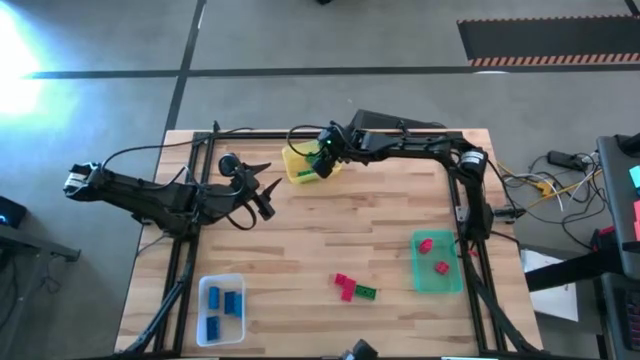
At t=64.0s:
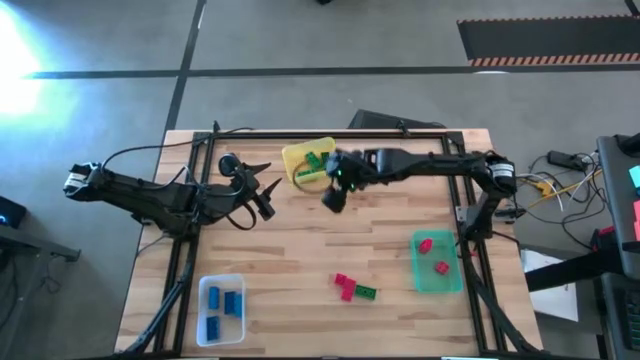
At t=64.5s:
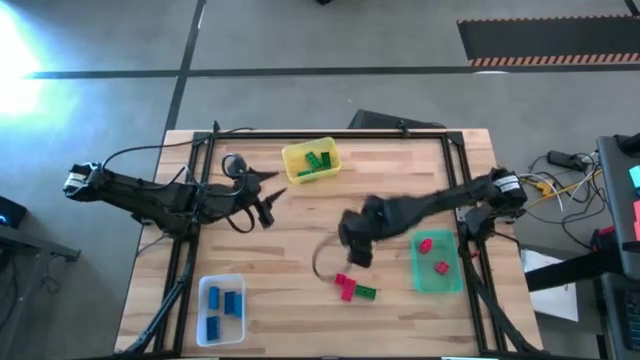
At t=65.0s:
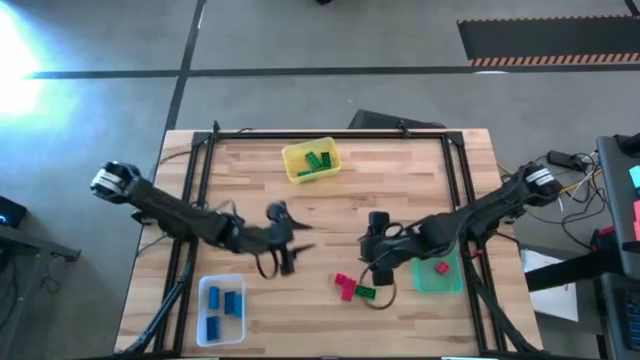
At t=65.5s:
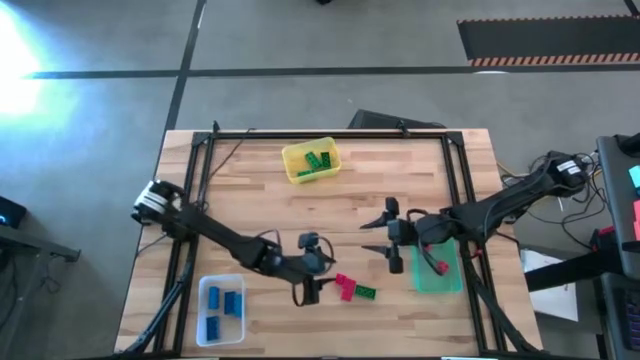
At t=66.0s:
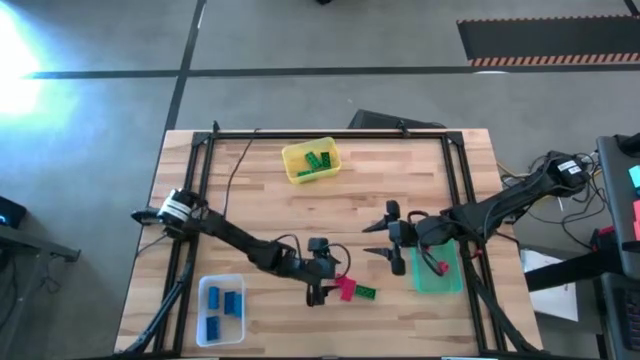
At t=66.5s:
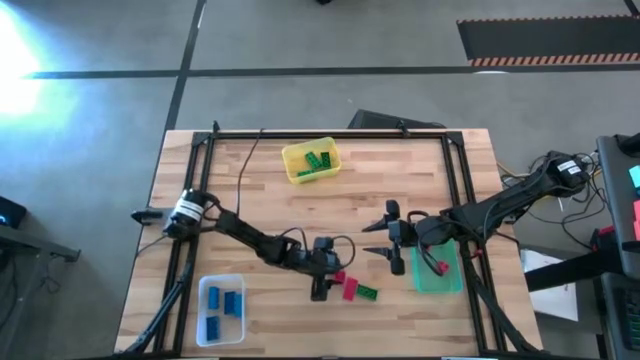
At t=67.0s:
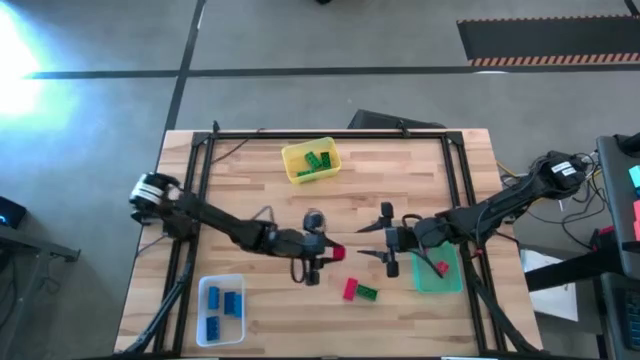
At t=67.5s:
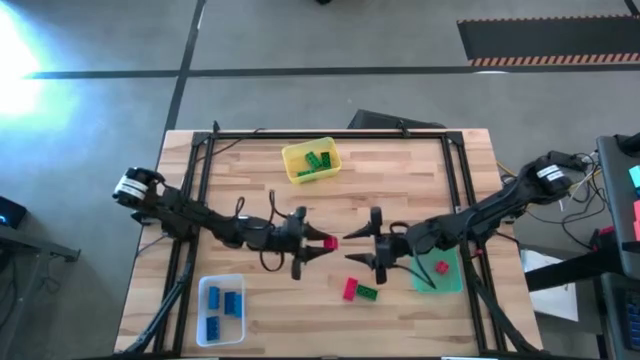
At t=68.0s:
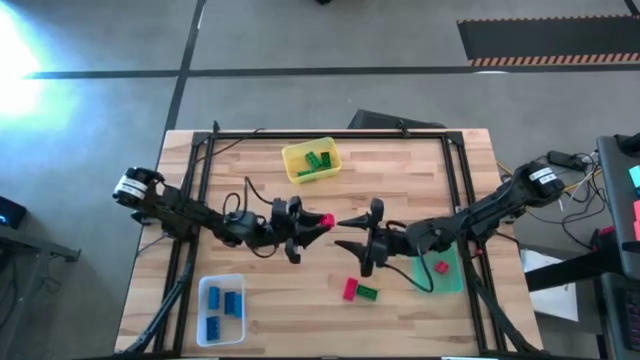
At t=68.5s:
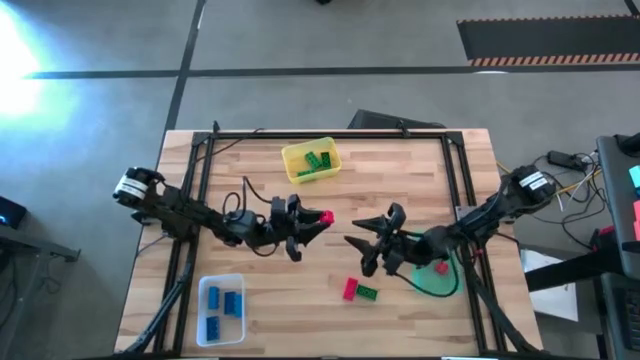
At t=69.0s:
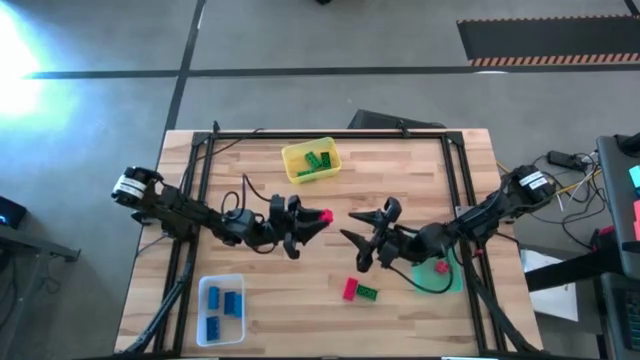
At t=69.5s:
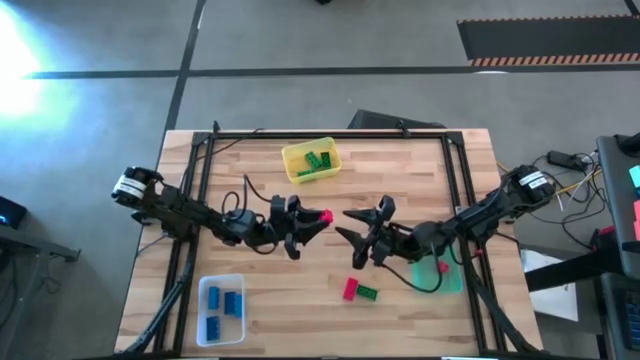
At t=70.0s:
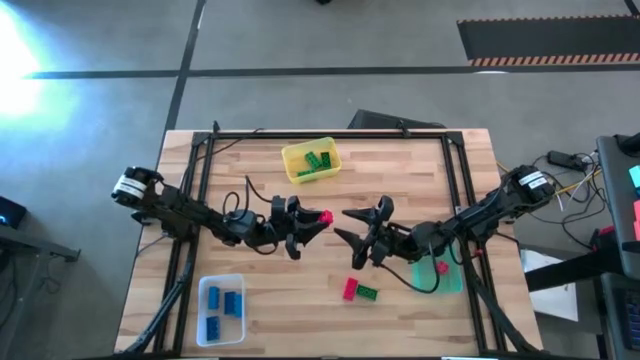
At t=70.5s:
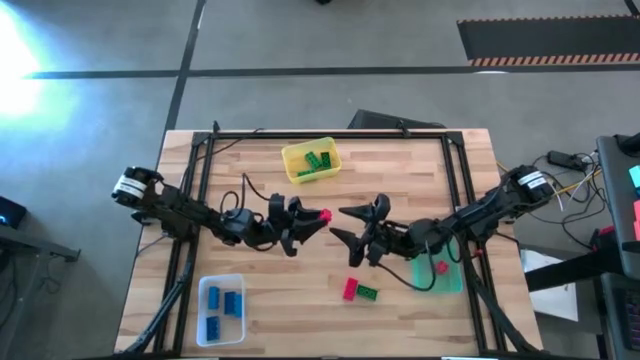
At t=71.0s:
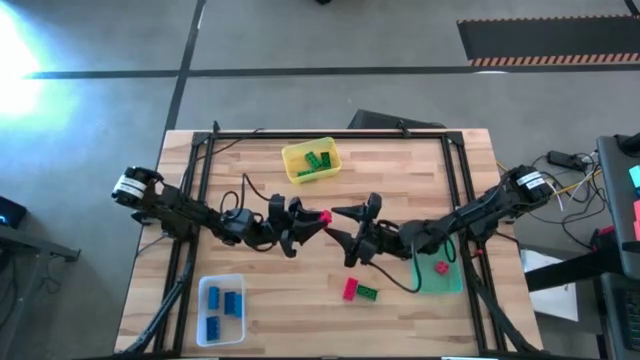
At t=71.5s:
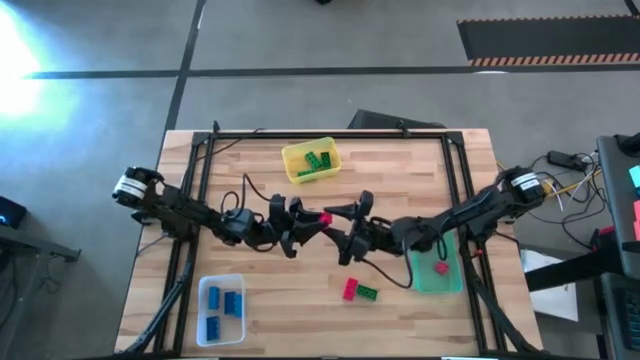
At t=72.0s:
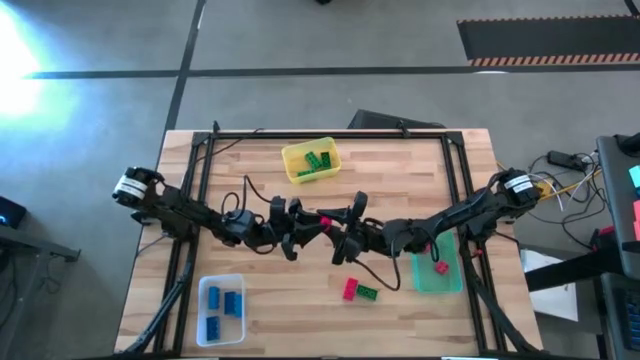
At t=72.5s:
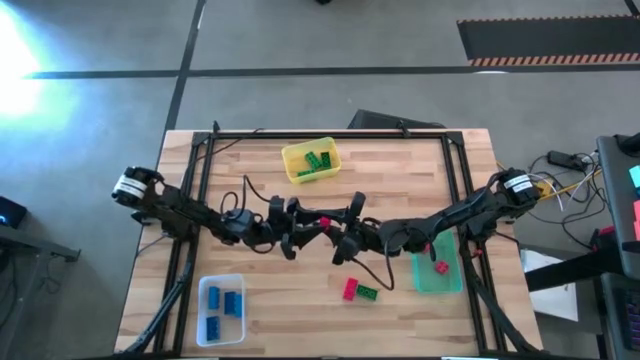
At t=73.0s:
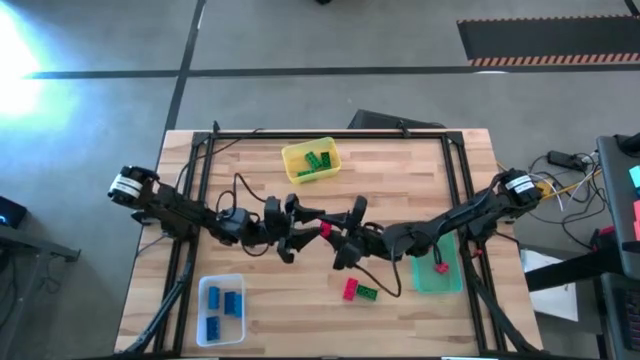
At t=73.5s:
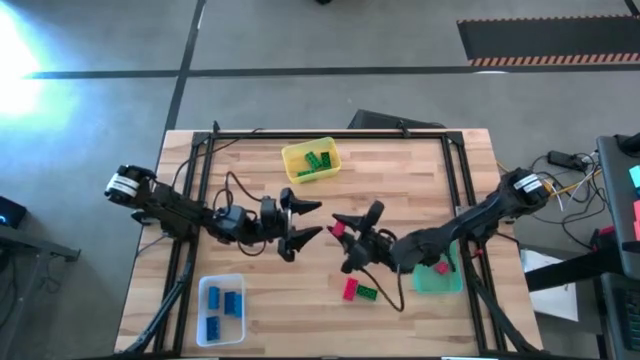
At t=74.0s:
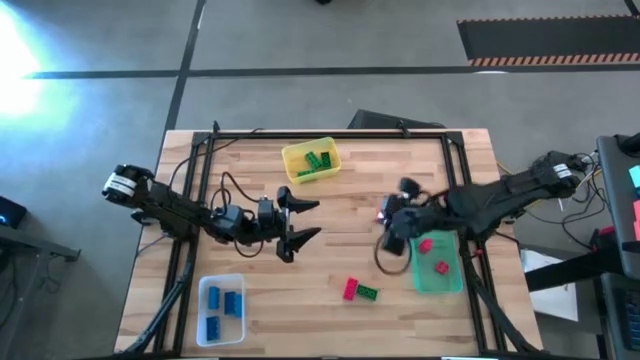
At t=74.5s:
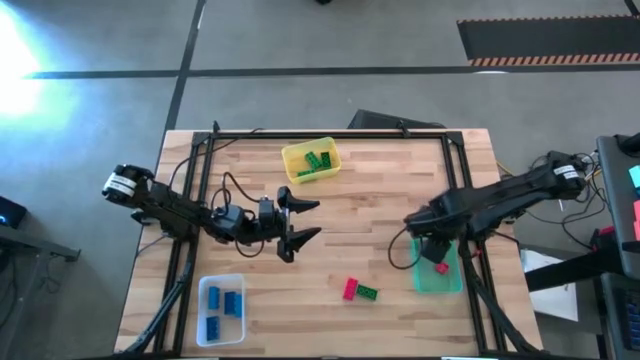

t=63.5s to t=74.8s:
Task: Sort & place blocks by color
Put the red game piece into the green bin

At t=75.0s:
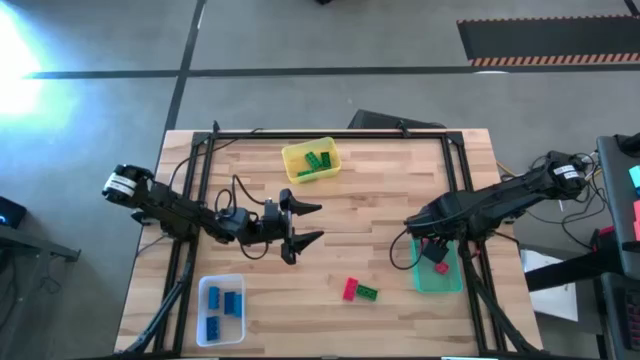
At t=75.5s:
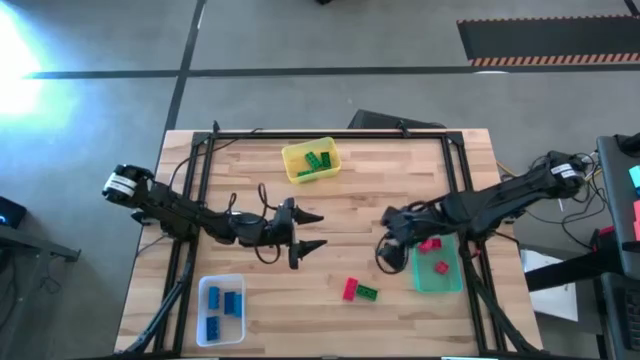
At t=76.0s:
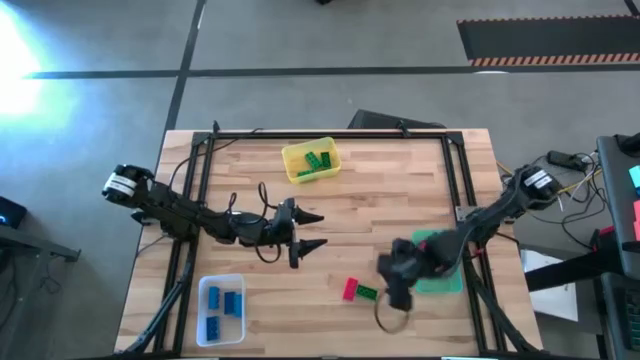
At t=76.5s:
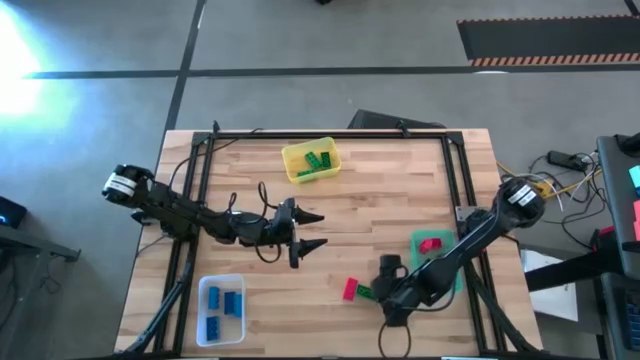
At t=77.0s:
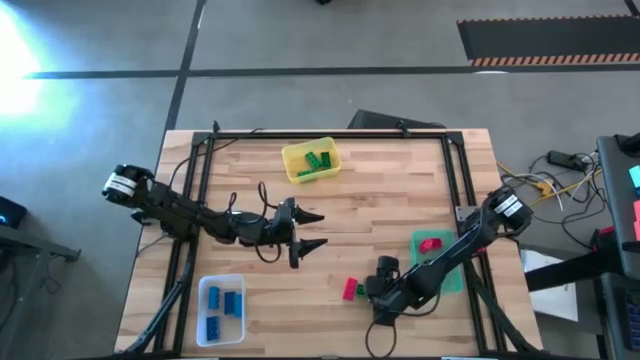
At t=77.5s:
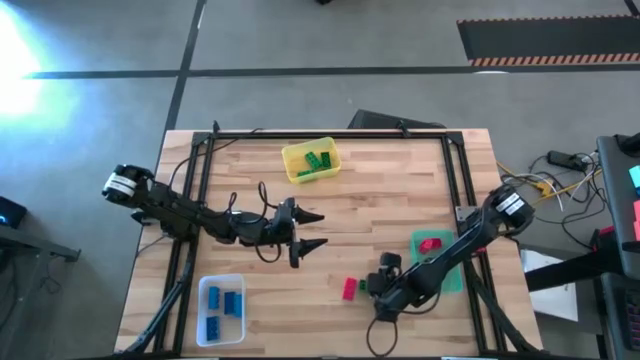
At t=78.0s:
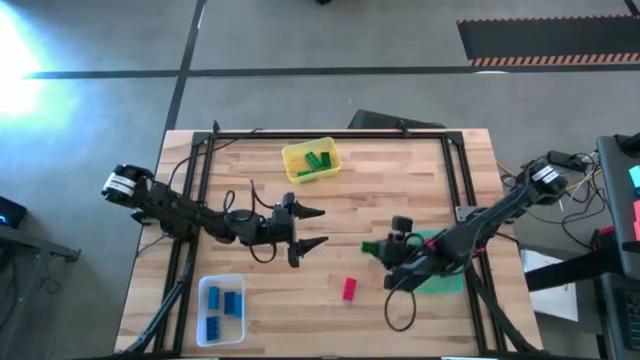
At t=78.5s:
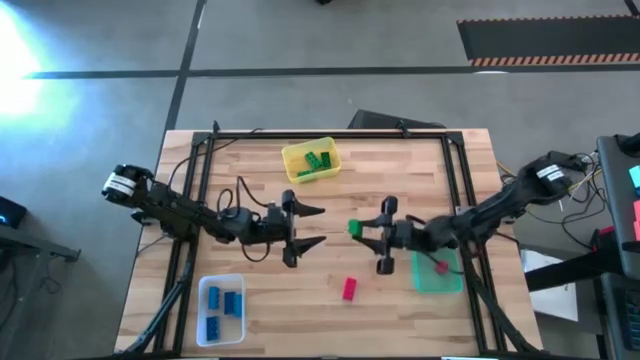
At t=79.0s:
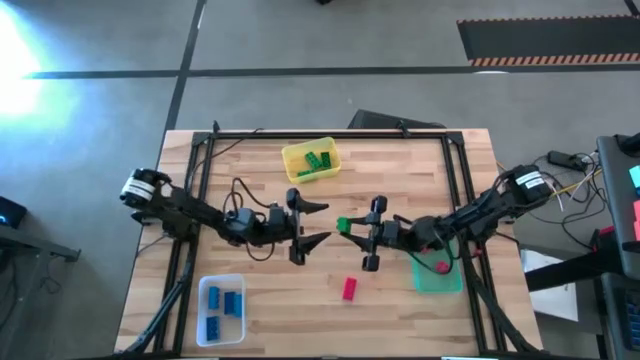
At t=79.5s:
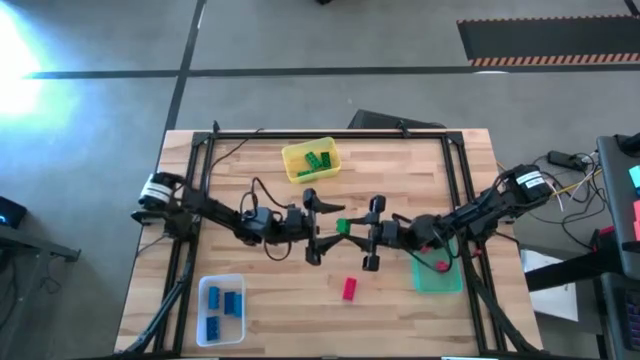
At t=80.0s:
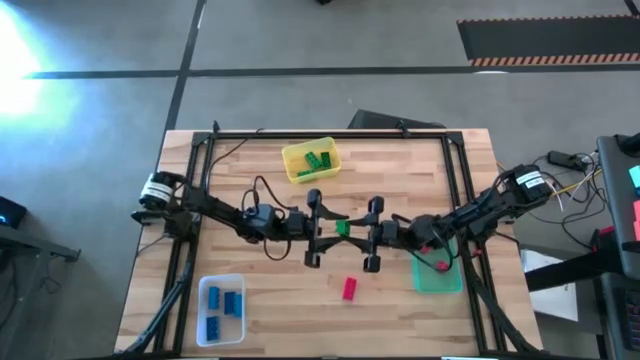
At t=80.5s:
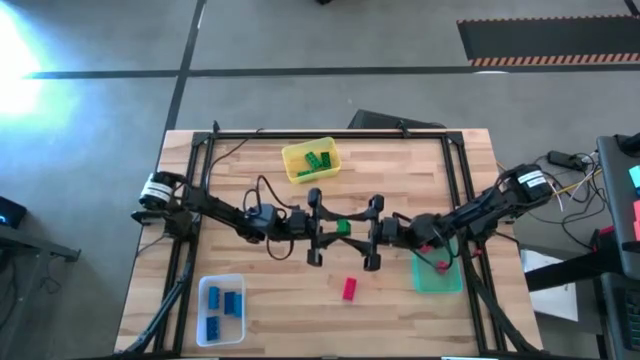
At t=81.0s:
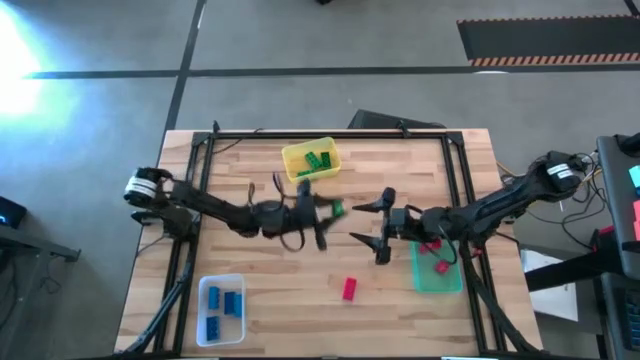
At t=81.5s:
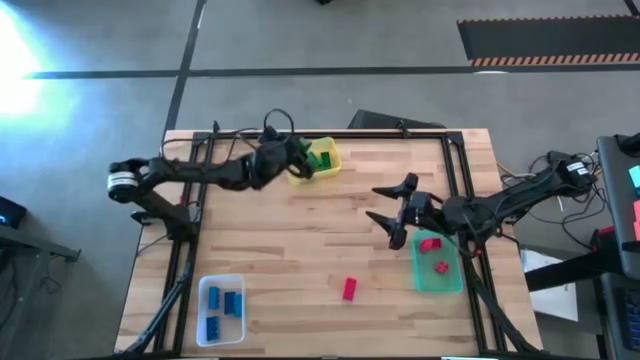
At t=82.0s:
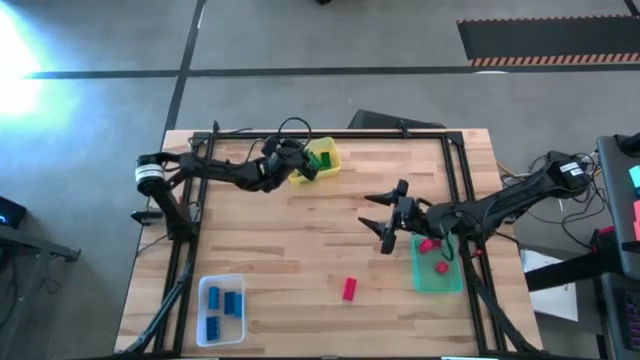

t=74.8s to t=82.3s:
Put the green game piece into the yellow bin

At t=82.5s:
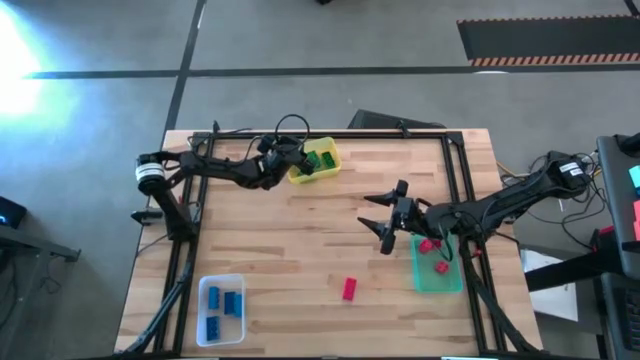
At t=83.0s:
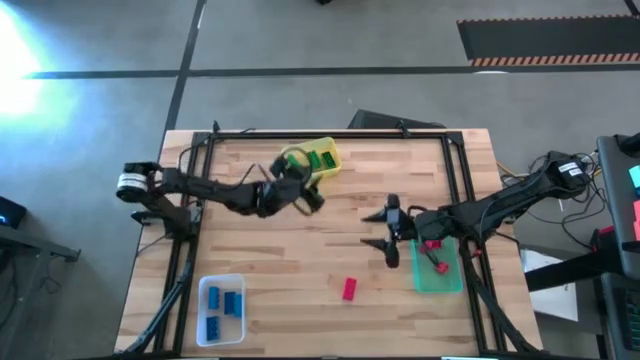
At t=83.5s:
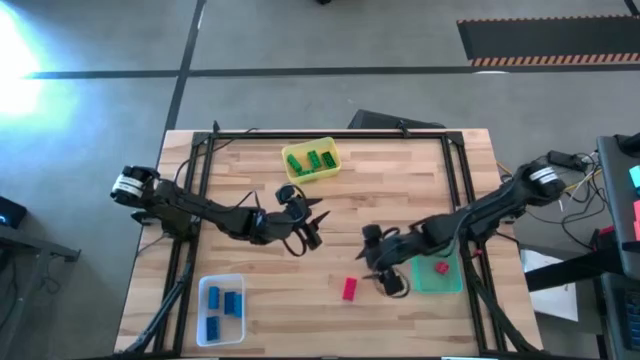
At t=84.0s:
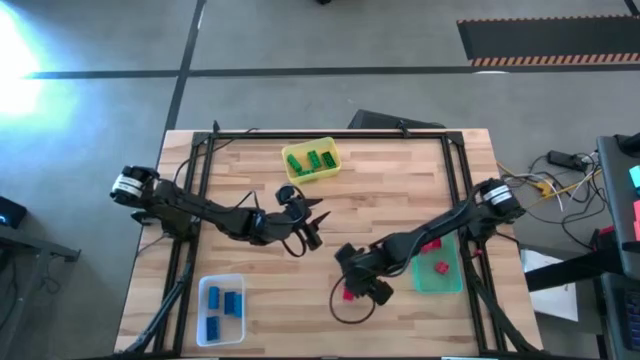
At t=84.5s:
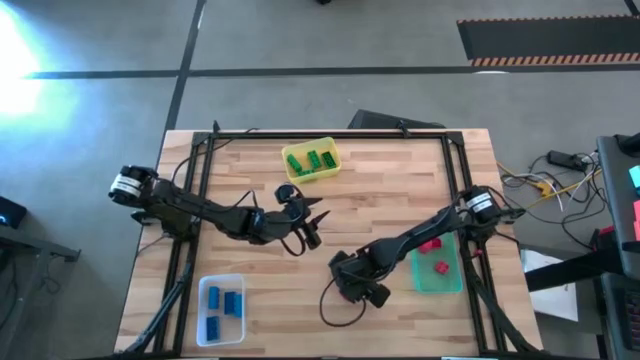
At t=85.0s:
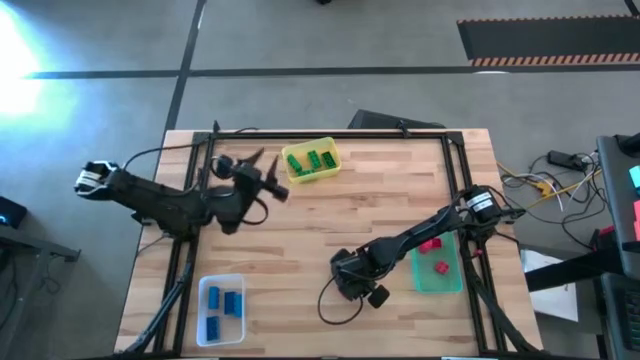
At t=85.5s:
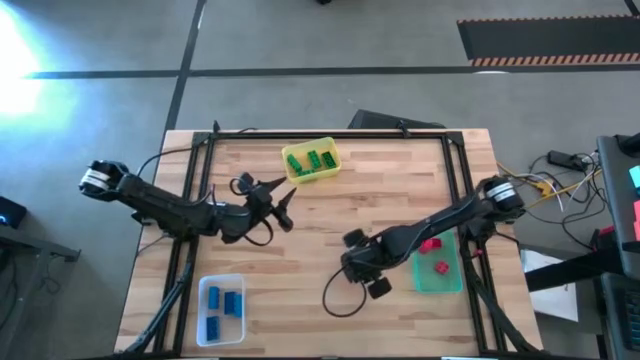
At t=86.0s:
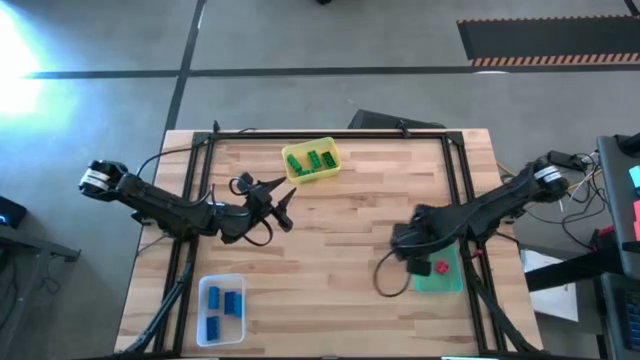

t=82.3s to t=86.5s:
Put the red game piece into the green bin
